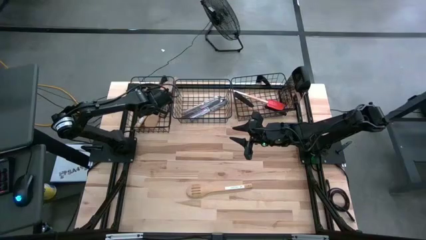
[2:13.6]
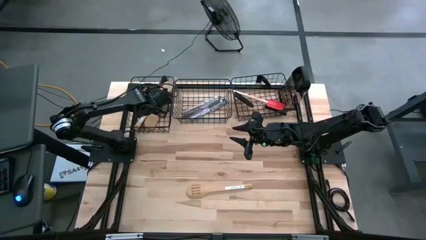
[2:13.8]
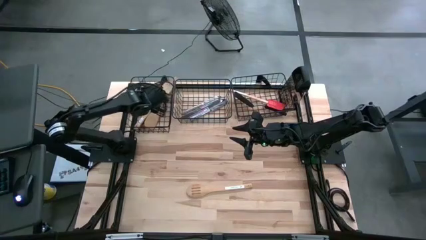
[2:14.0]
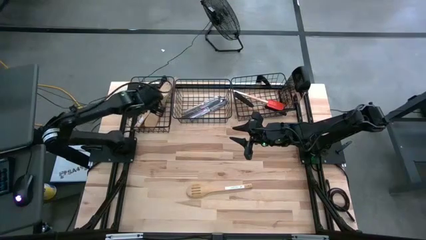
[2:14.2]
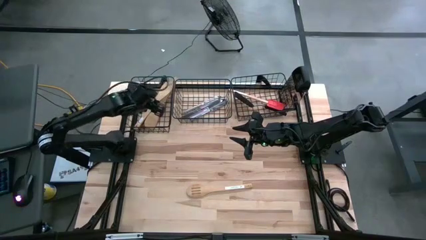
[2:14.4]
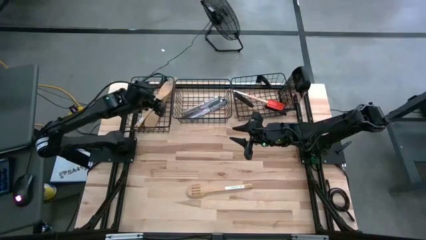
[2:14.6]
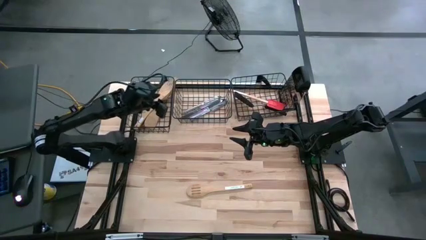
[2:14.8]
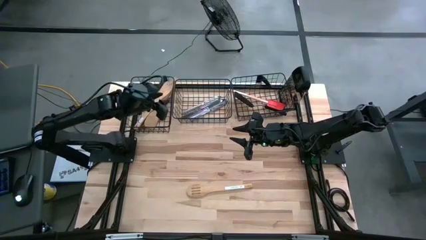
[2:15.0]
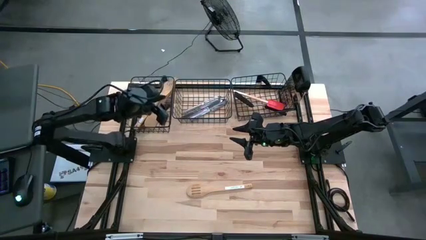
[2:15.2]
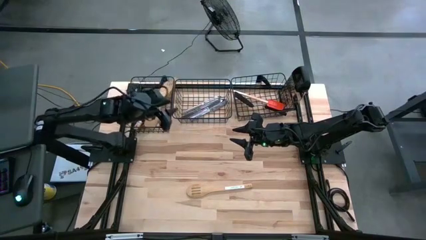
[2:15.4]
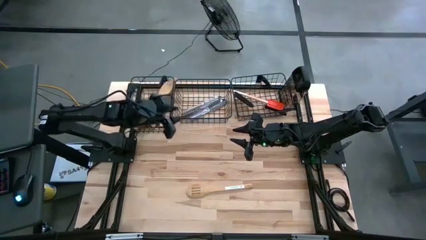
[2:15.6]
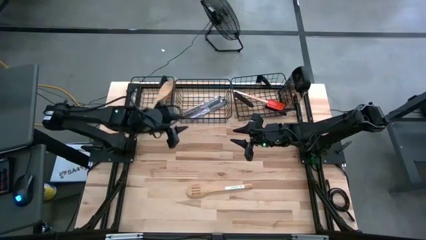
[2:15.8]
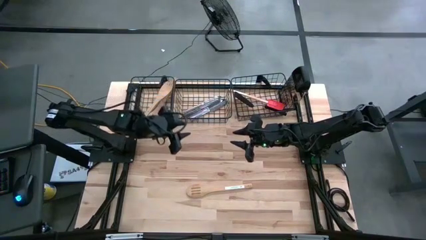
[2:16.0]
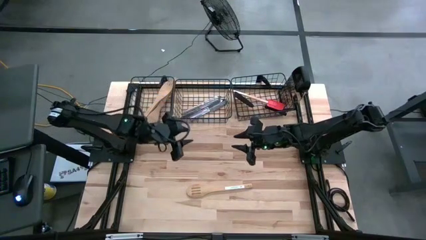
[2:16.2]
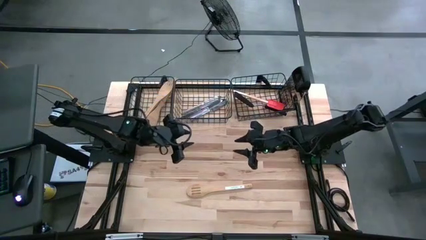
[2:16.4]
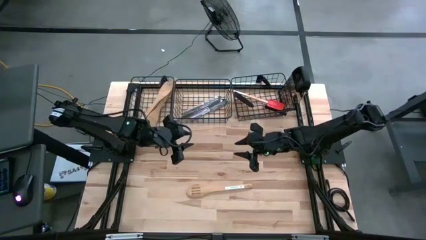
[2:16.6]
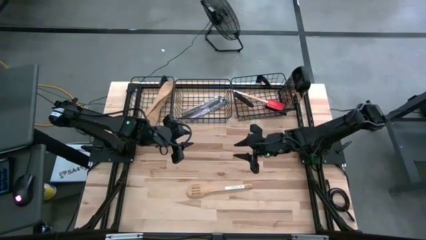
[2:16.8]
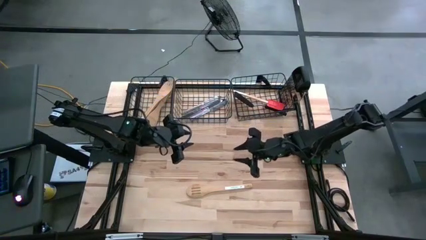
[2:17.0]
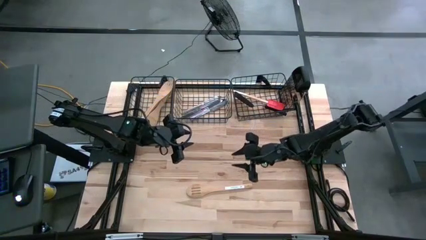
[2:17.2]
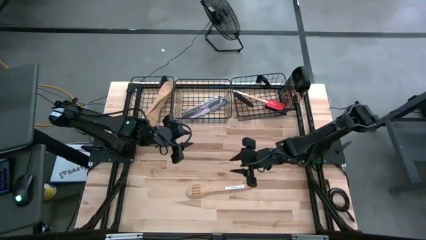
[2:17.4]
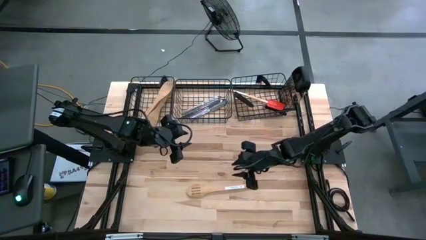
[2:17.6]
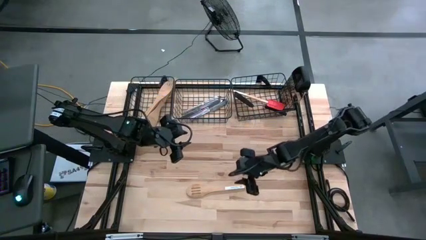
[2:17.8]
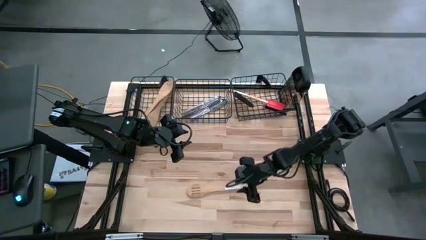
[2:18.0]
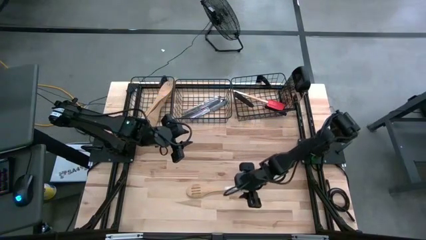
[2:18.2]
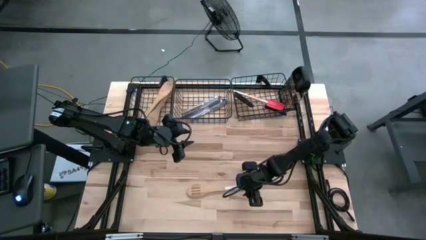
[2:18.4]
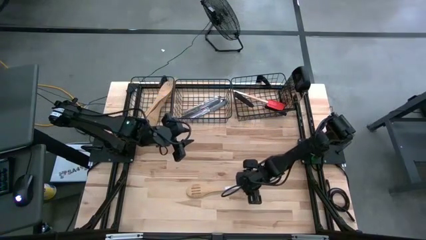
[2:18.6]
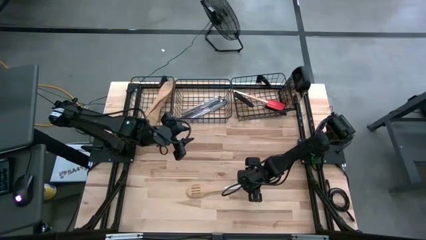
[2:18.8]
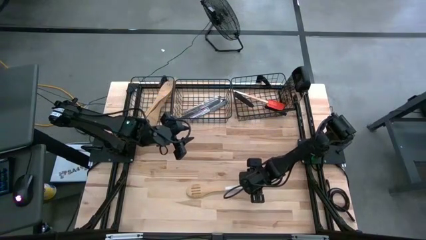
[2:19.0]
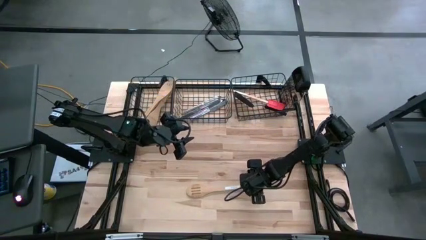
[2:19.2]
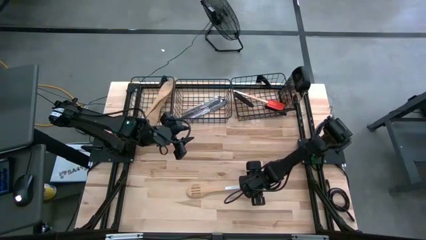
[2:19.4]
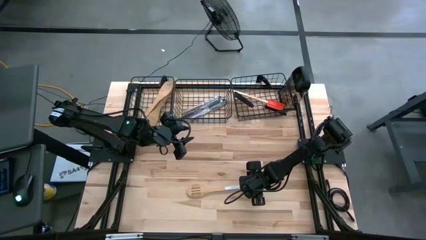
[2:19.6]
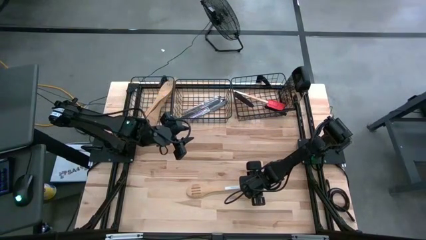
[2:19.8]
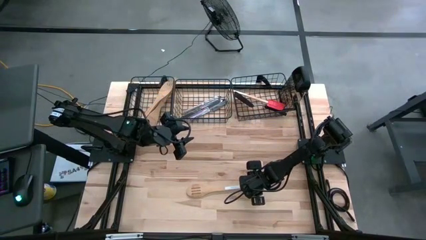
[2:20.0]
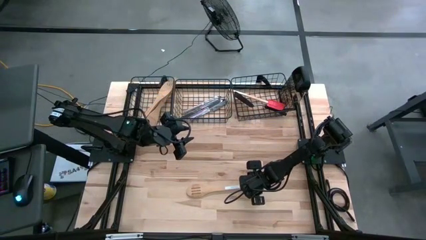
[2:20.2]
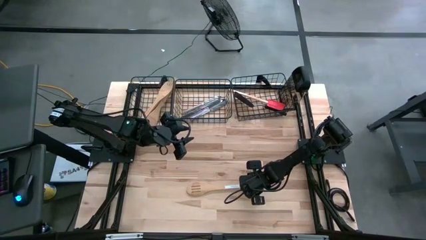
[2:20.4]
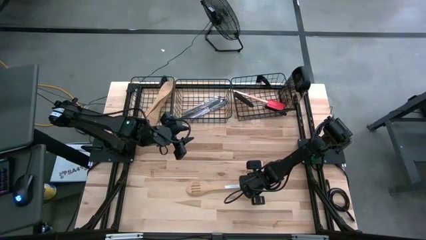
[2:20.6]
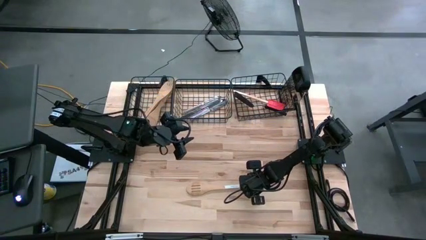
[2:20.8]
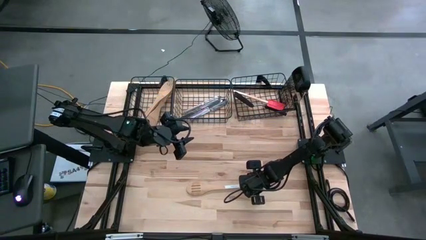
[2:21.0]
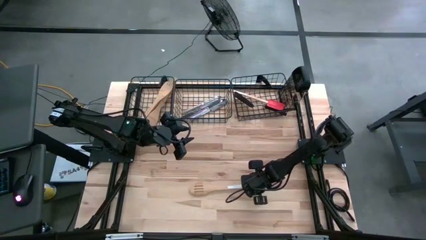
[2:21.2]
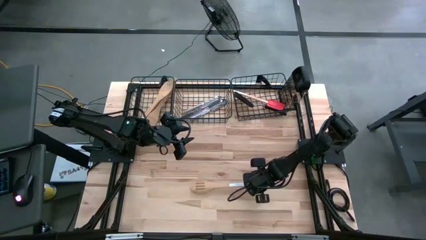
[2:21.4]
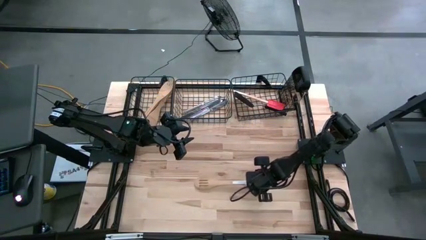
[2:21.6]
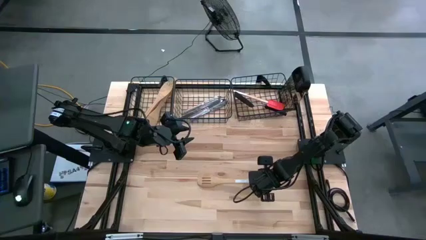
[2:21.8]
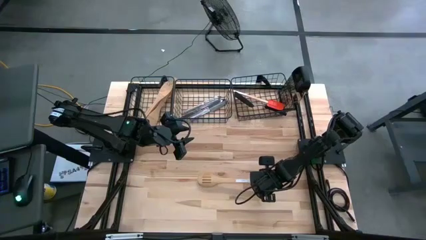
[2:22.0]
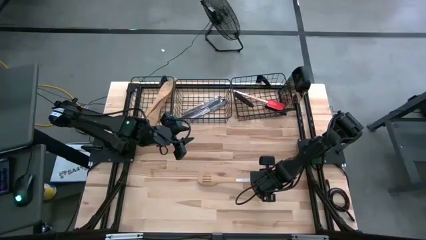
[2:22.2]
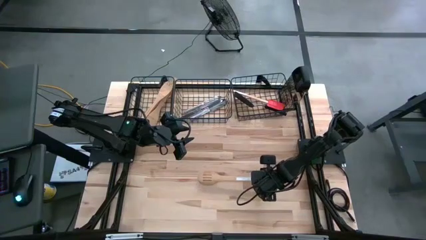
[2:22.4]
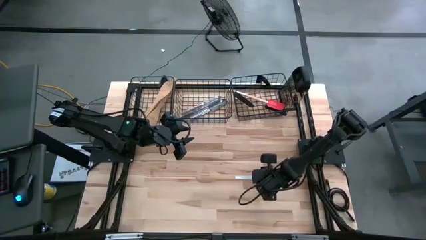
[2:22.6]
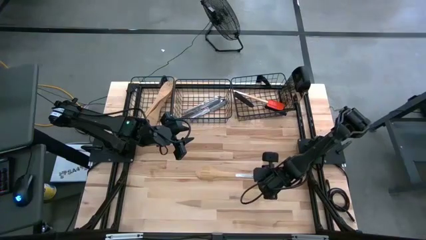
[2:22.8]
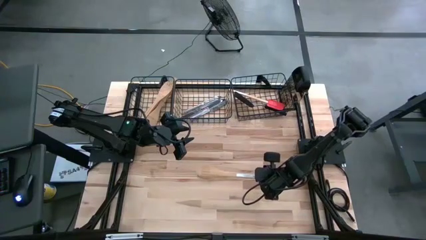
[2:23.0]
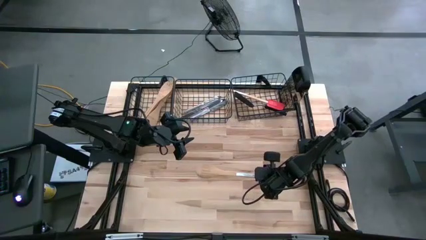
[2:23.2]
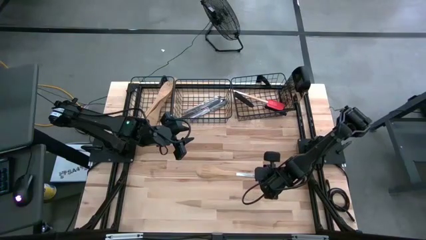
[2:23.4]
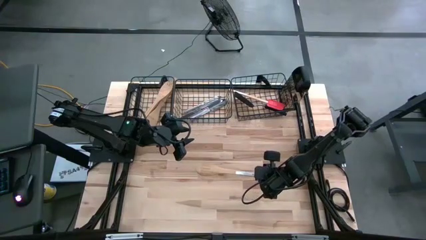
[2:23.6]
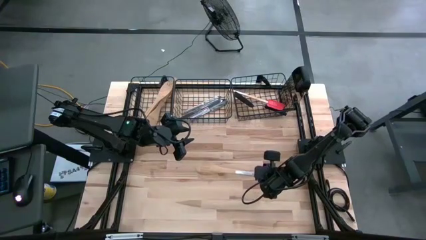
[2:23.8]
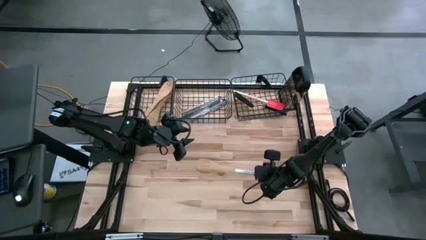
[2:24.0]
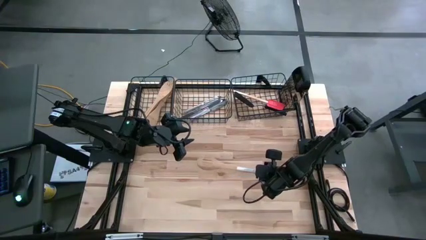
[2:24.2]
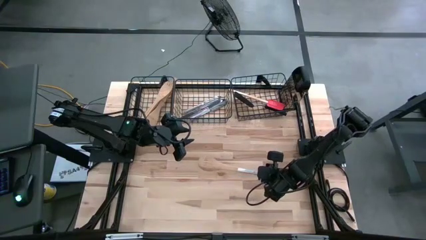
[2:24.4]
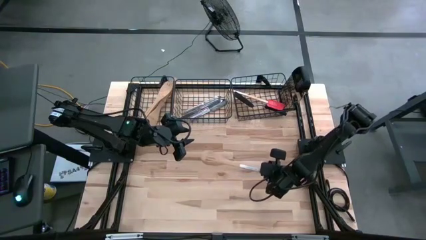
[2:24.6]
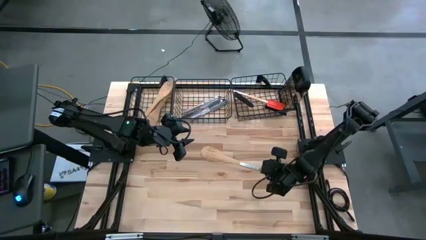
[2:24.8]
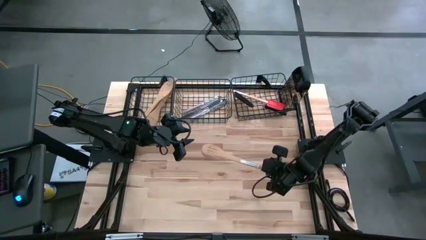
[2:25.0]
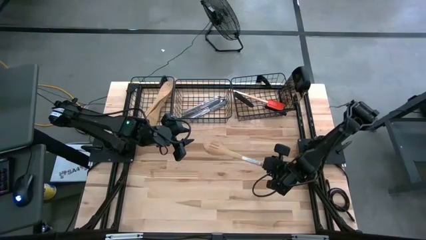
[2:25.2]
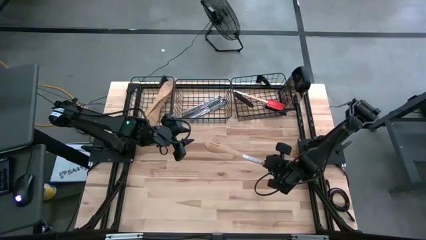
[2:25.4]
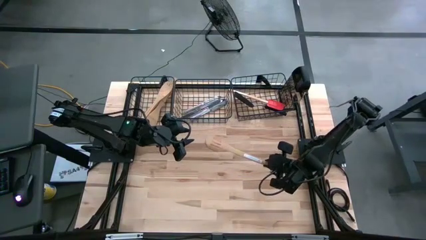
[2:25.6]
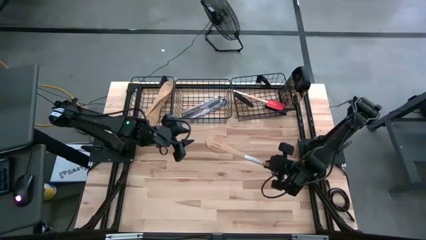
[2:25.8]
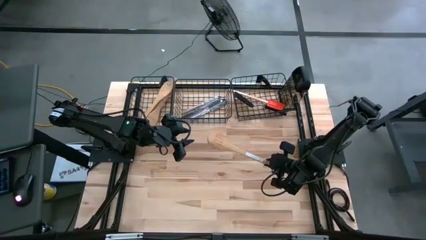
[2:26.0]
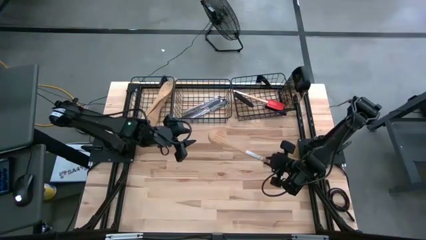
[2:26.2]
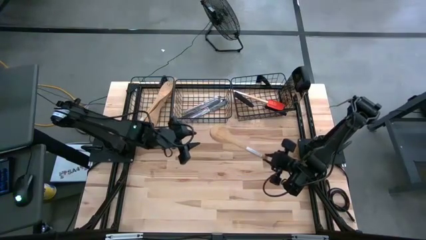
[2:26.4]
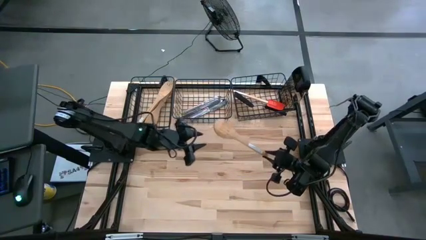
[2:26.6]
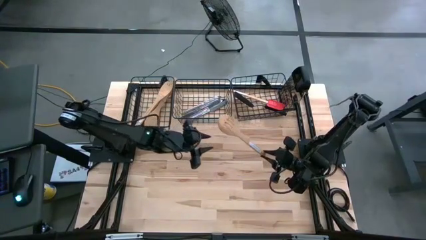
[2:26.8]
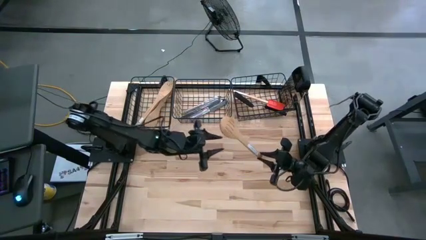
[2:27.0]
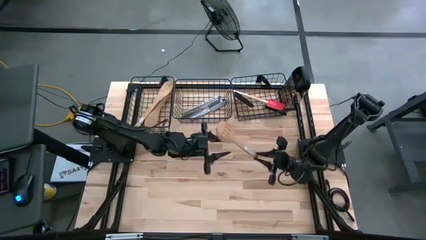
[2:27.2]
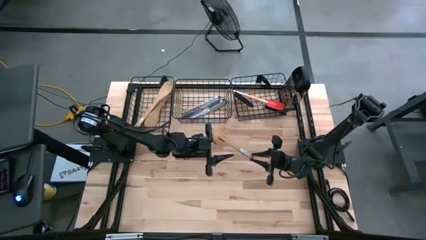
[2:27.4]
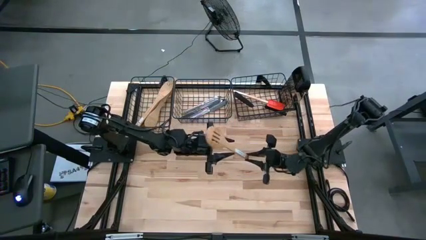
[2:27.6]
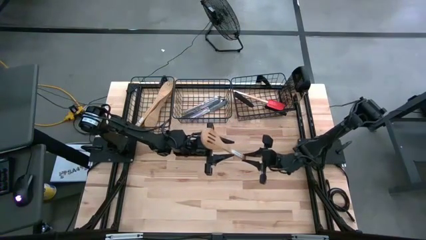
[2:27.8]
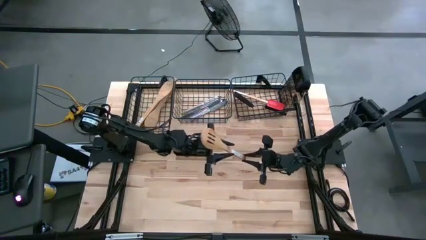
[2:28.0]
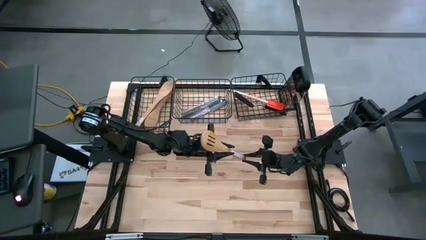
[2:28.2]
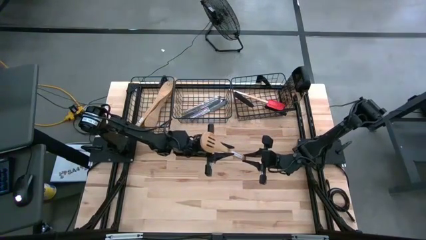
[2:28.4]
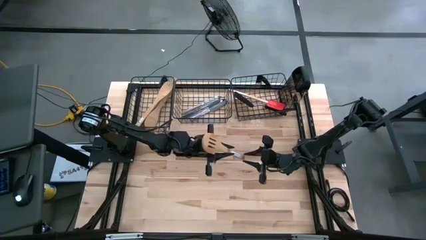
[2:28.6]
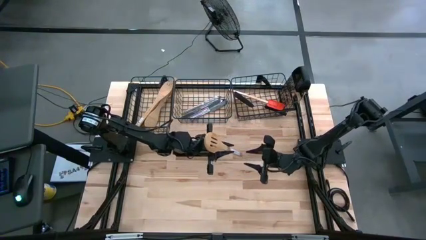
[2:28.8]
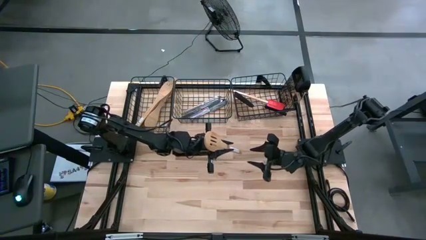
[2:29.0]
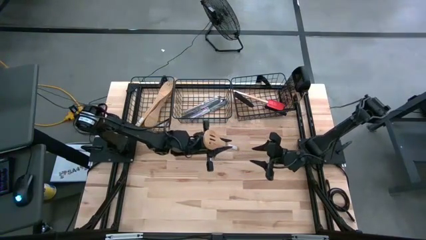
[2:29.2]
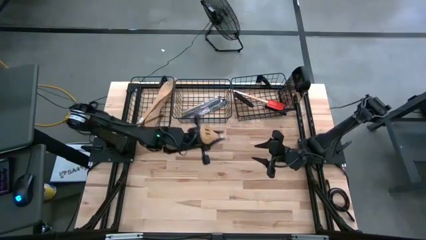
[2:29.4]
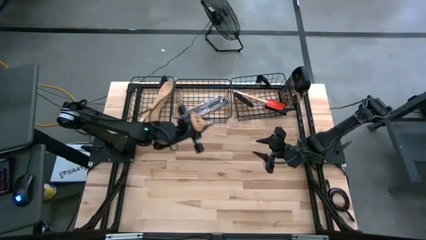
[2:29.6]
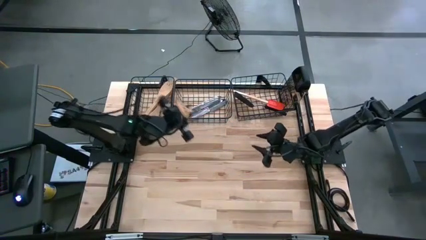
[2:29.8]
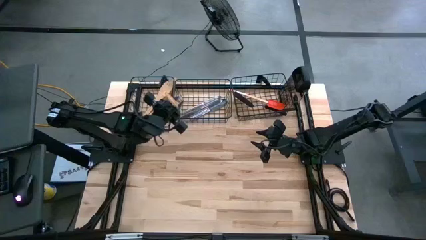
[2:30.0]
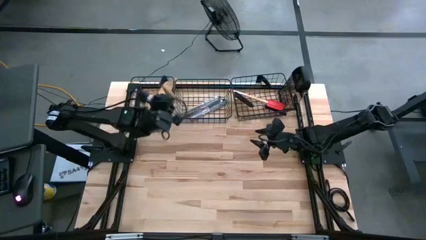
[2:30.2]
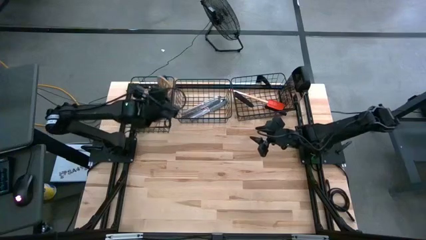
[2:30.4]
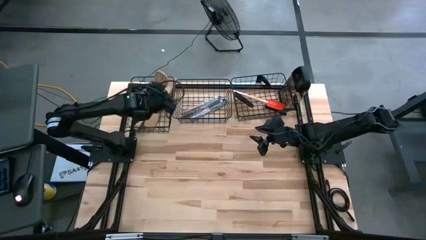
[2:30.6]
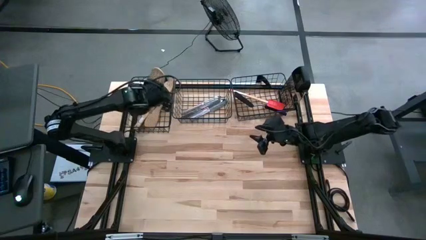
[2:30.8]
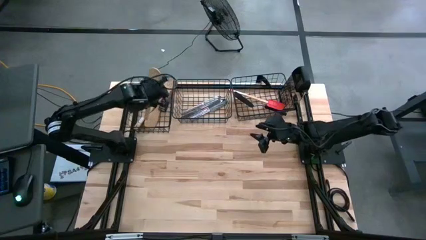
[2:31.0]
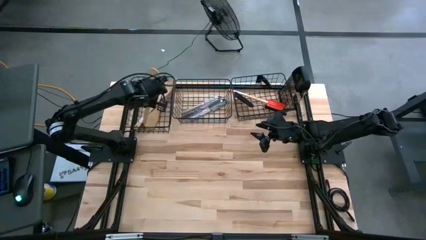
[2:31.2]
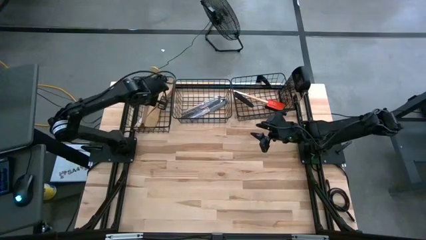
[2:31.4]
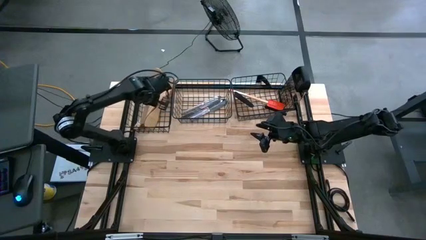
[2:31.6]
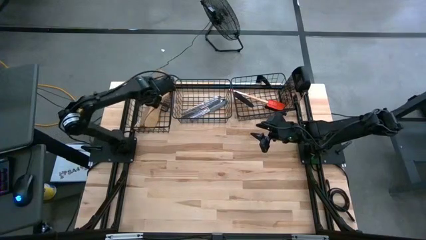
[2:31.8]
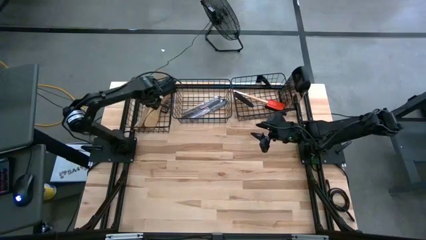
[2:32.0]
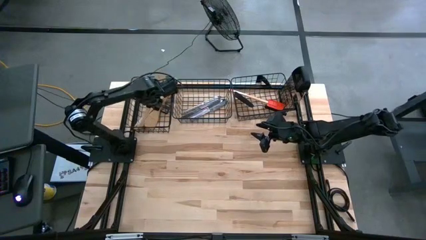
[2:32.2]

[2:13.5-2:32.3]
Task: Pick & Place Kitchen Items
Put the wooden slotted spoon into the left wire basket
